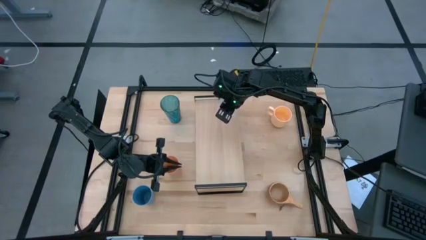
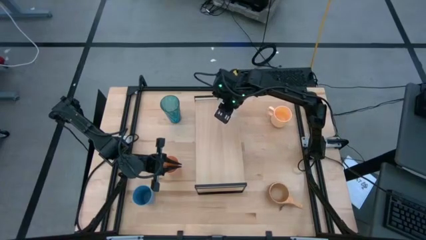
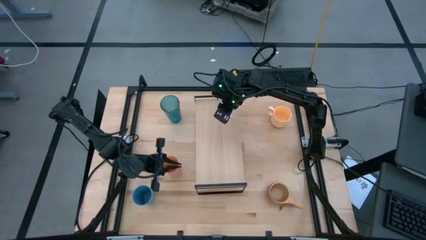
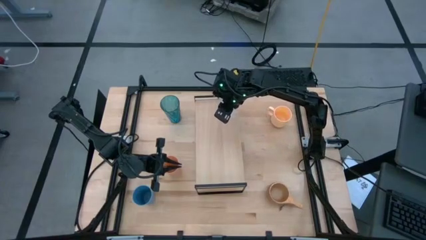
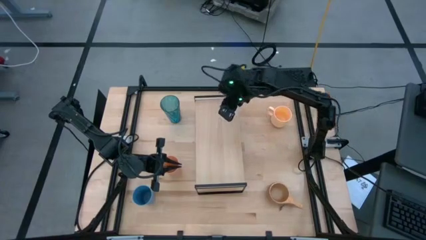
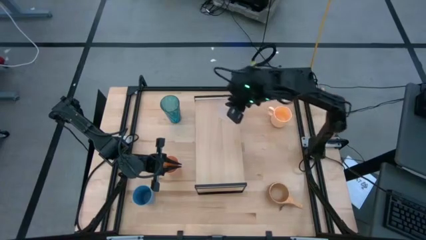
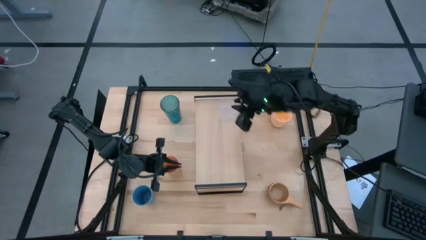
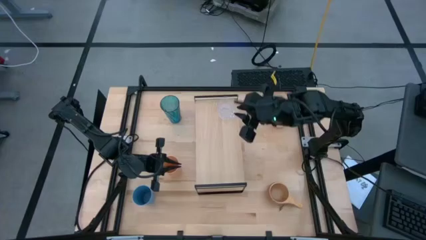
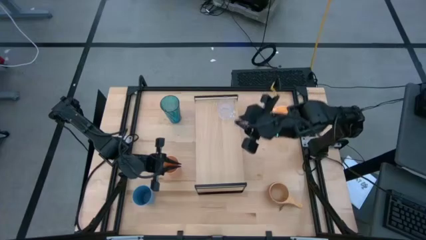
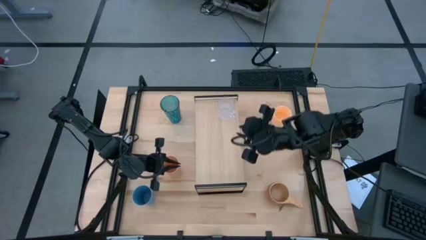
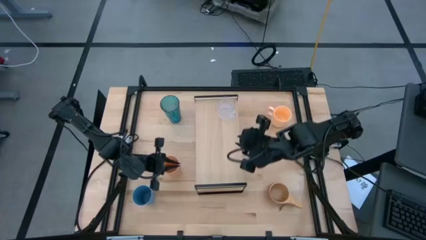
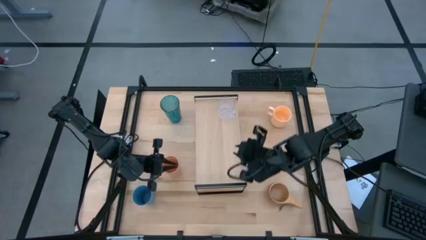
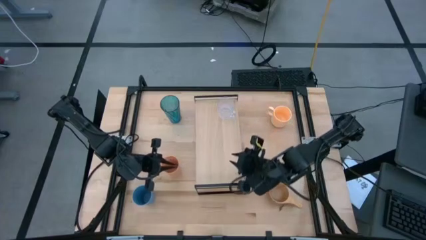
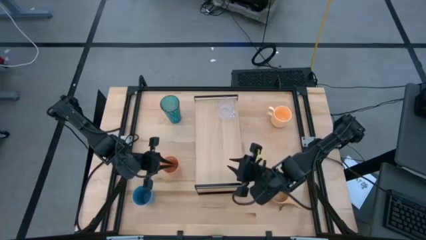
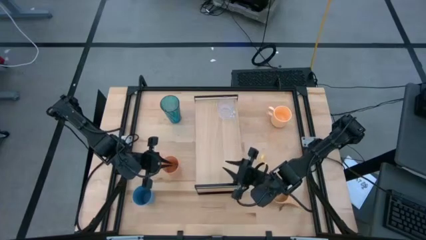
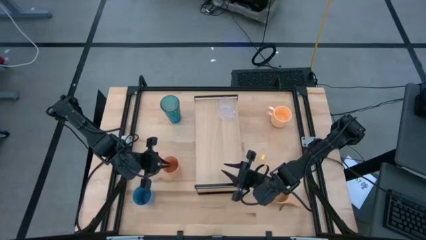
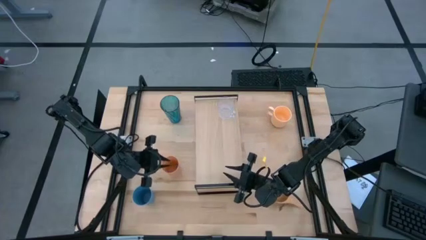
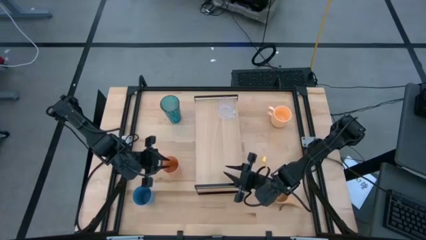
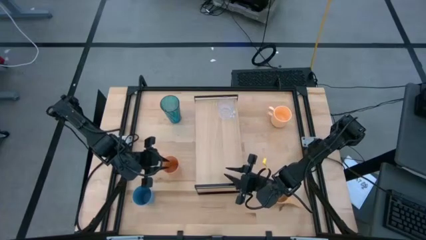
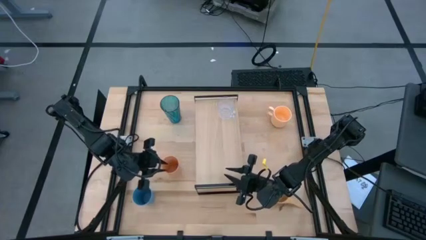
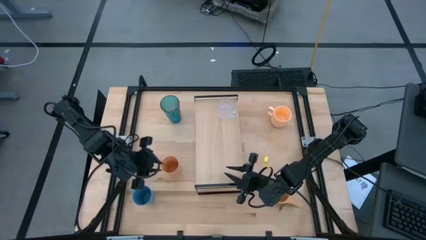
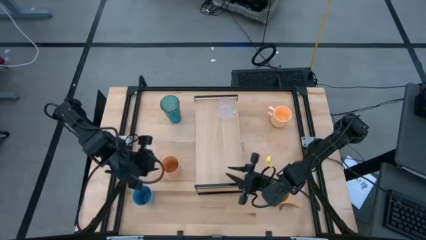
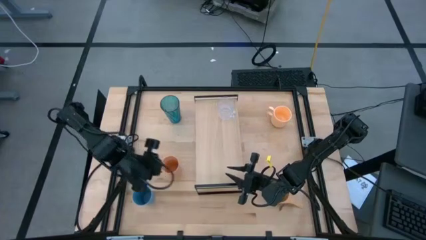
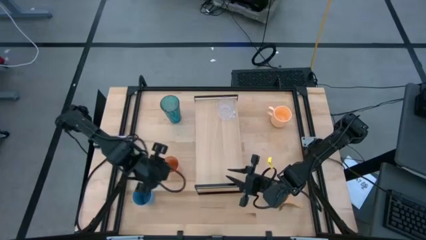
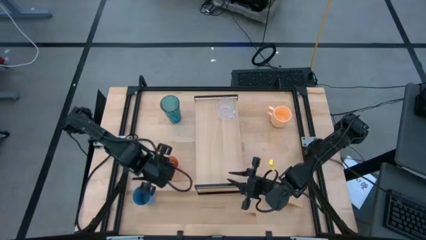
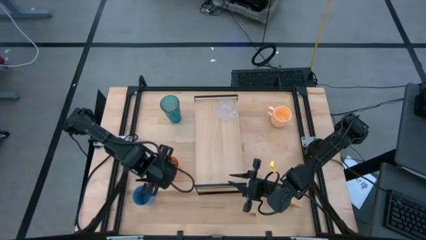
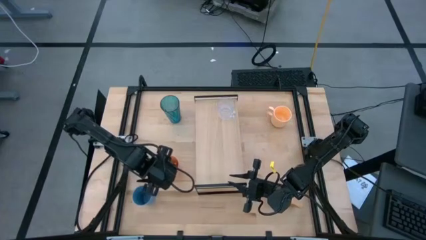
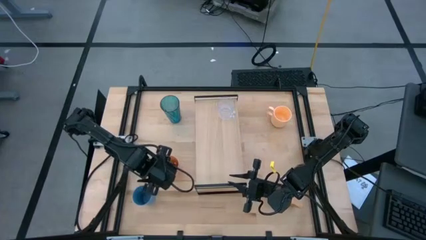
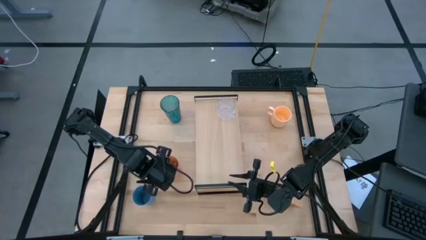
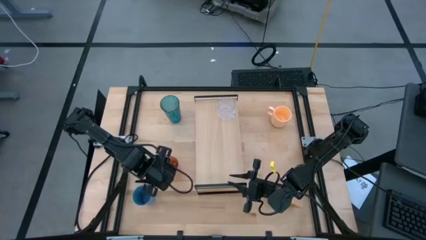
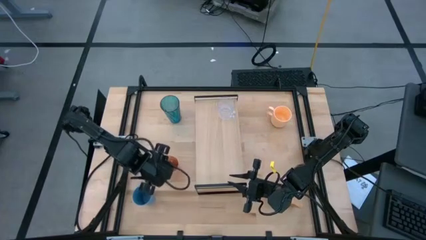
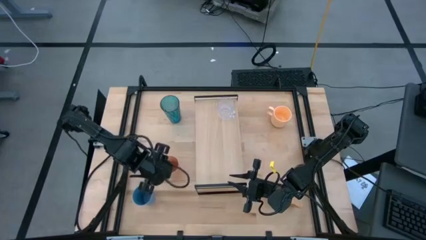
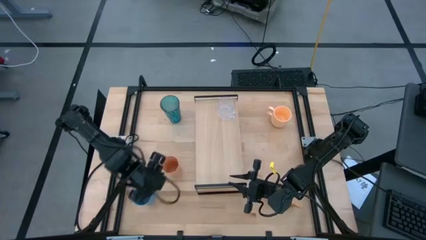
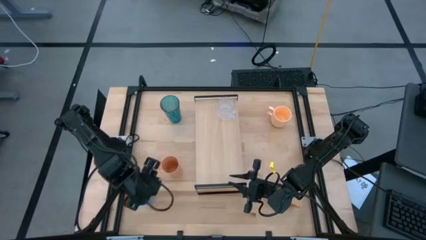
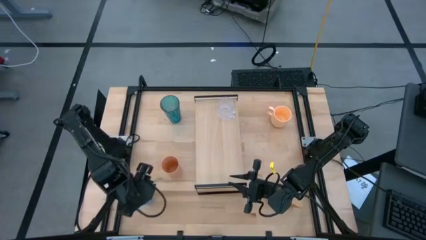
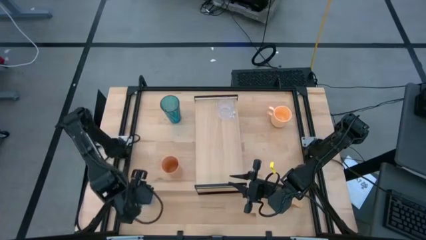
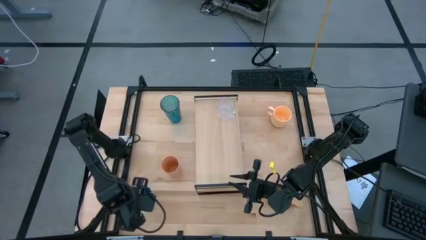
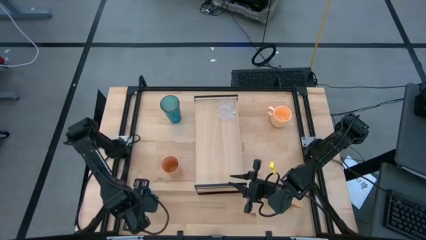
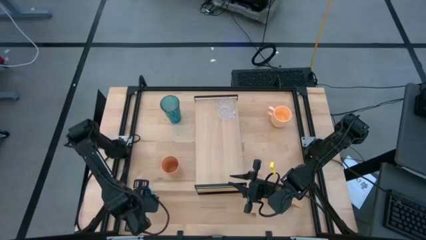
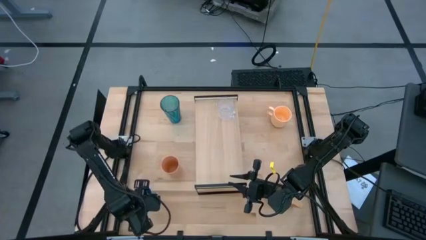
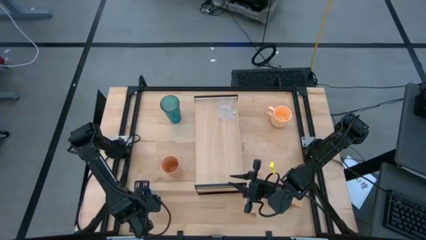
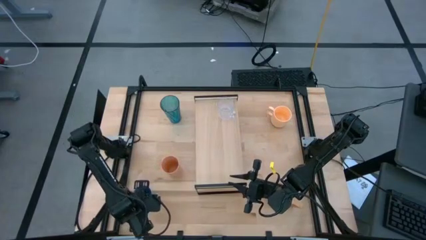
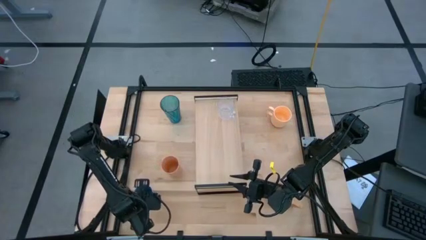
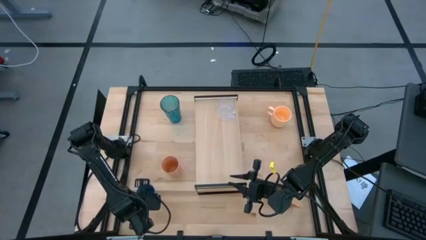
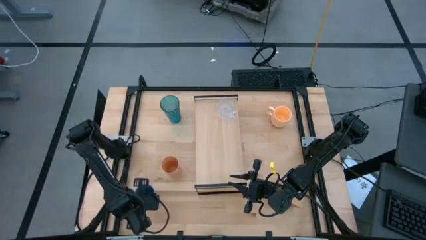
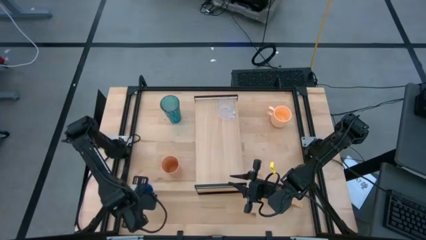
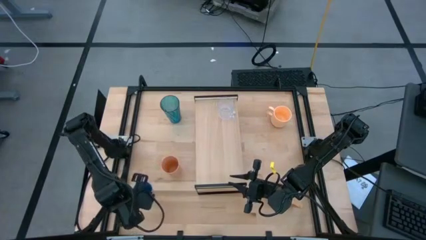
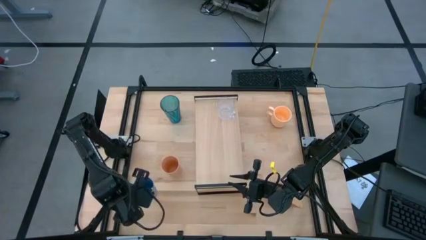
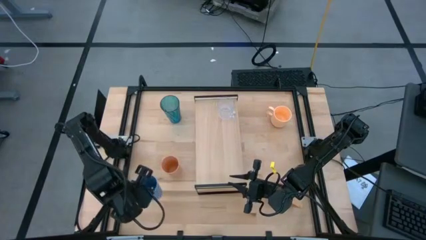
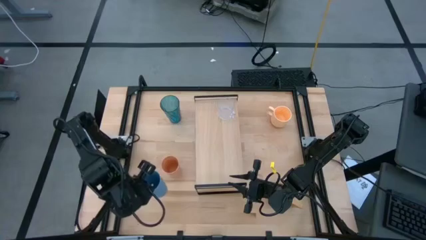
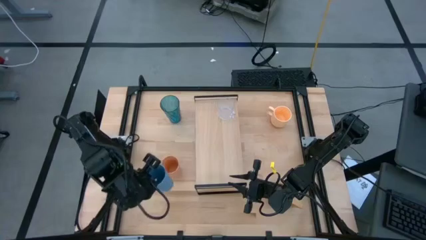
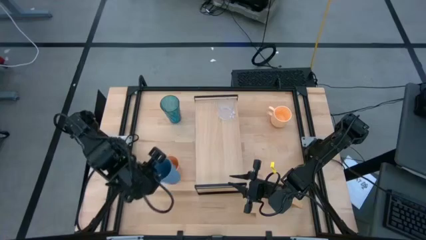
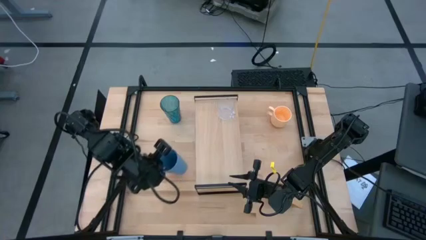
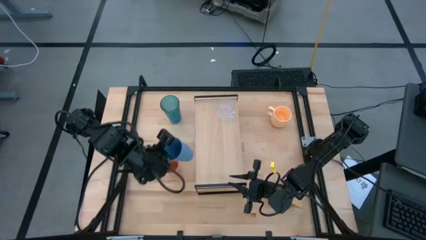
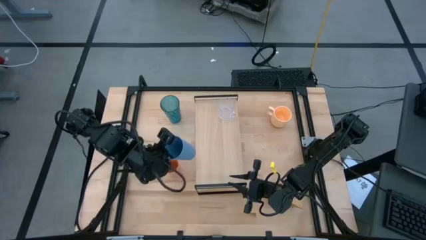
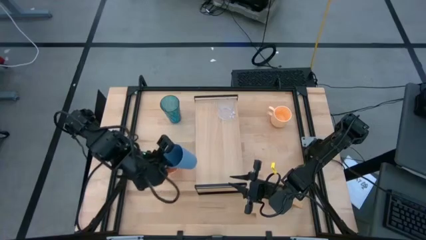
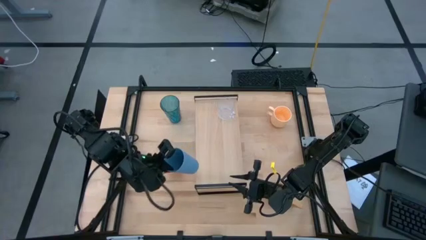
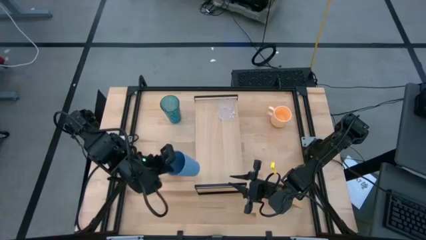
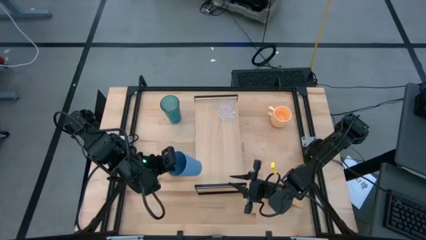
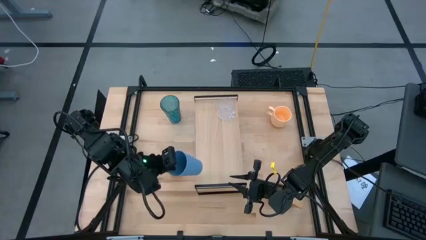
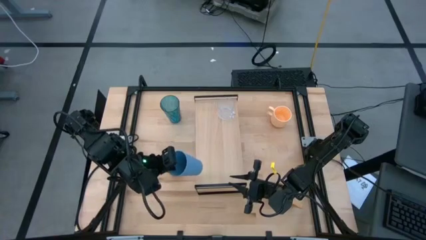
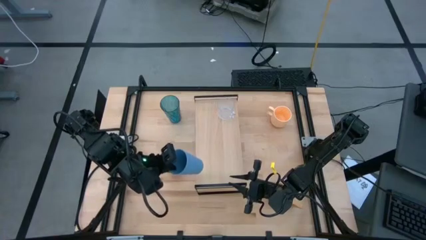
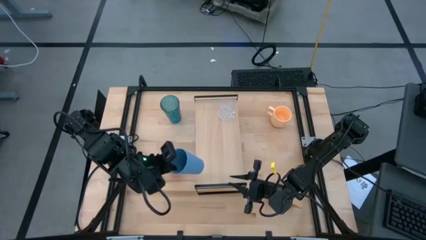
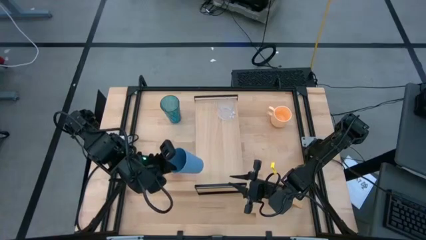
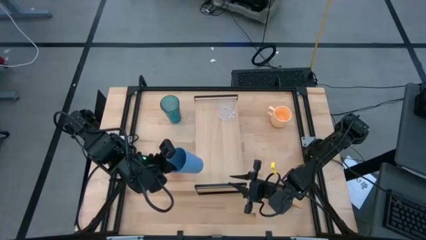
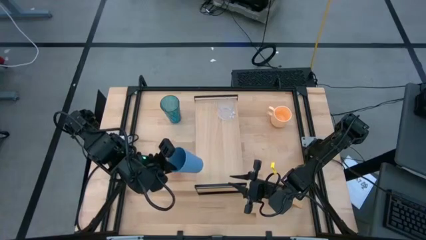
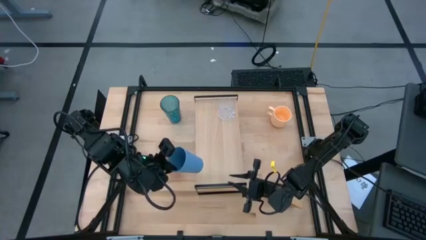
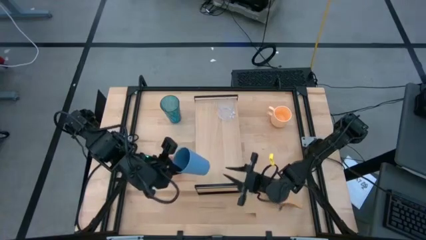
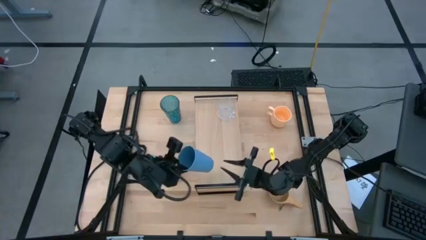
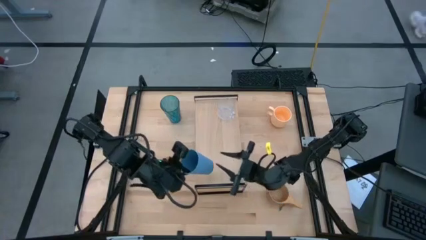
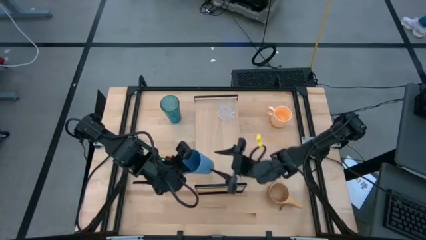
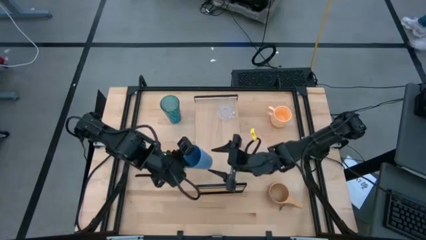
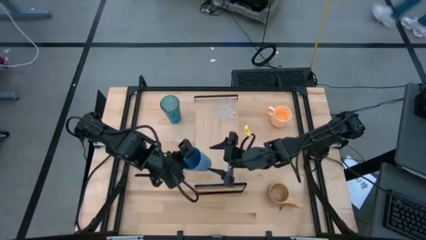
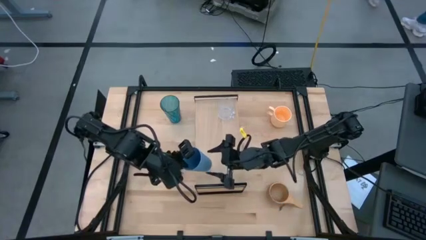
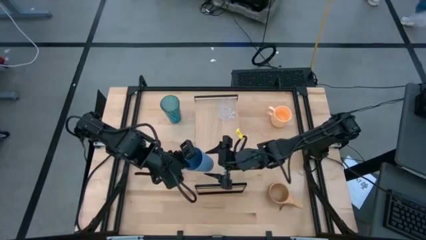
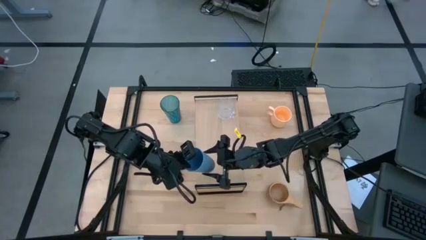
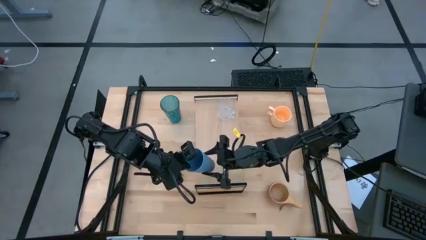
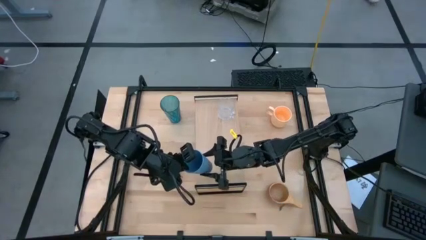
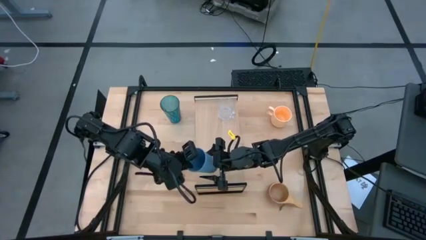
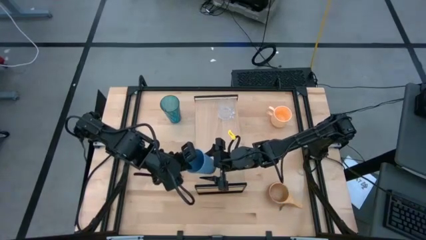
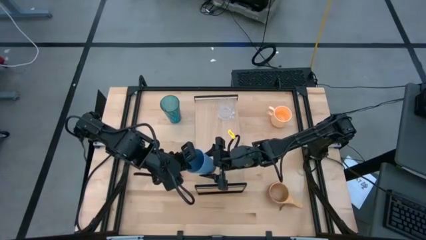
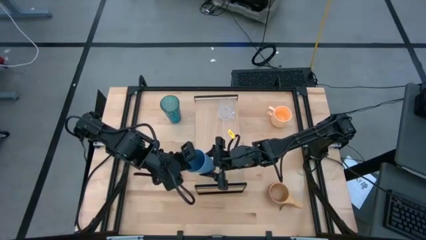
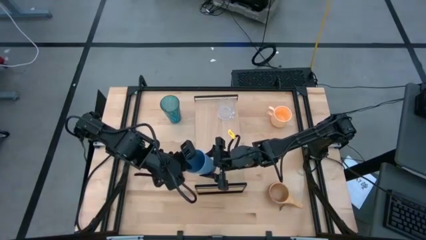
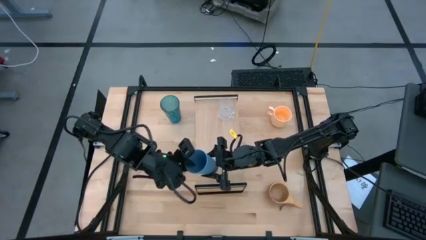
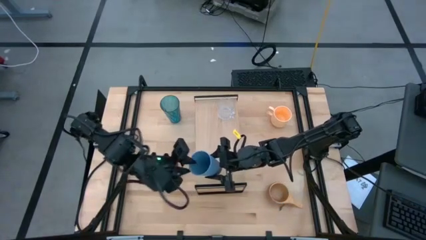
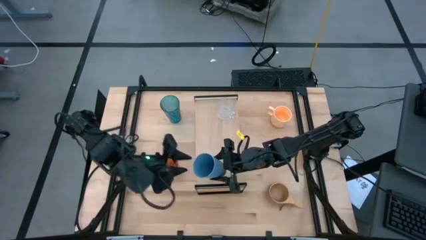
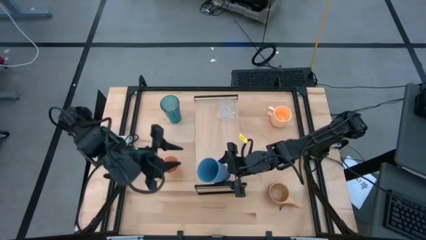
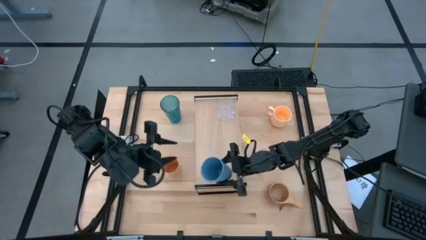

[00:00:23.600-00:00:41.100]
Task: Stack small to large cups/mugs on shelf
Put the light blue cup on the shelf
